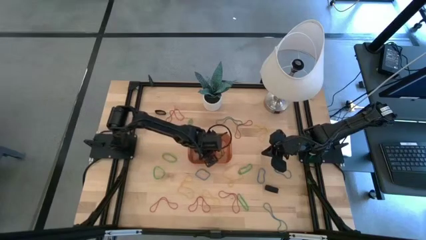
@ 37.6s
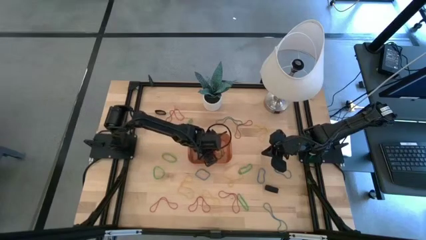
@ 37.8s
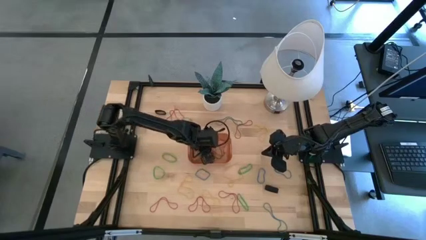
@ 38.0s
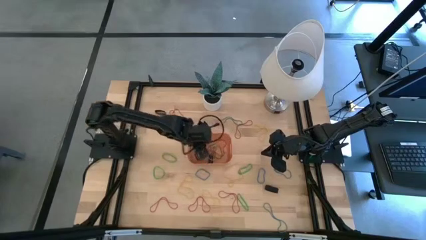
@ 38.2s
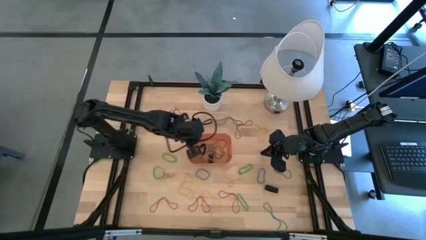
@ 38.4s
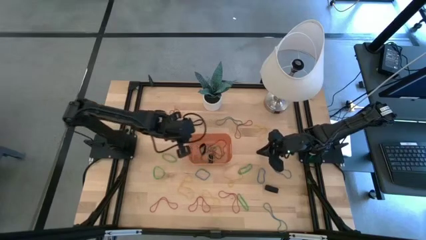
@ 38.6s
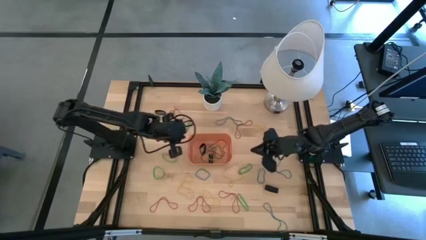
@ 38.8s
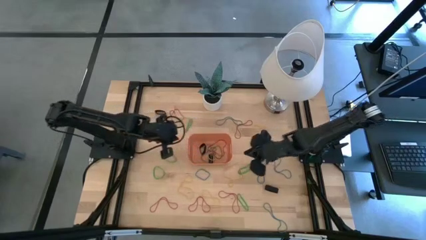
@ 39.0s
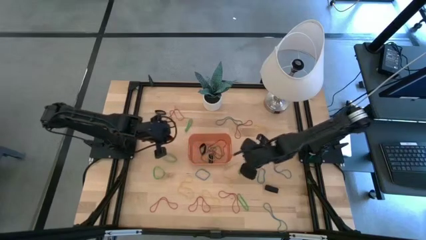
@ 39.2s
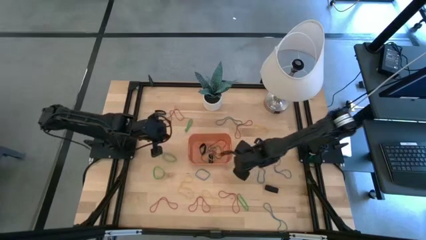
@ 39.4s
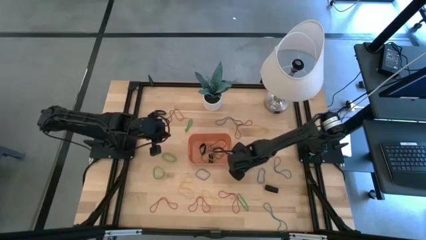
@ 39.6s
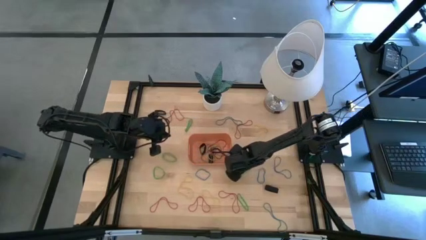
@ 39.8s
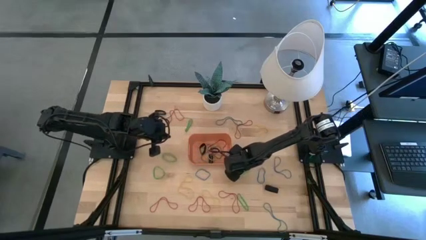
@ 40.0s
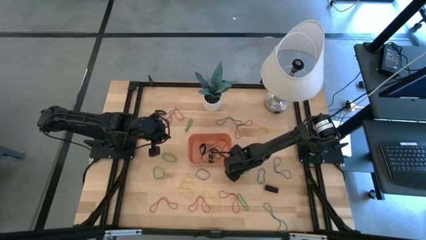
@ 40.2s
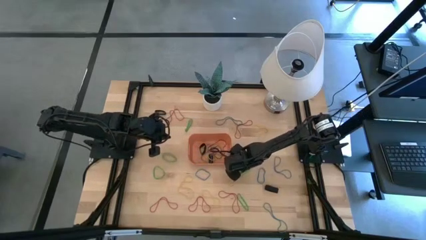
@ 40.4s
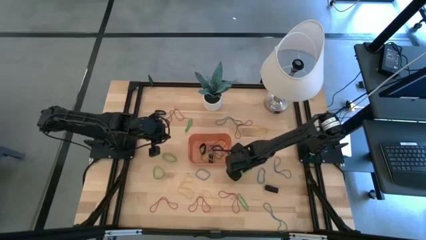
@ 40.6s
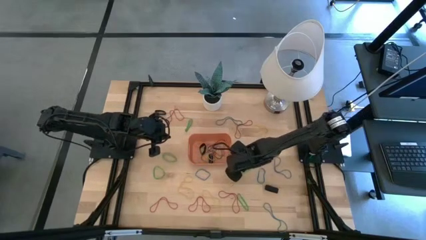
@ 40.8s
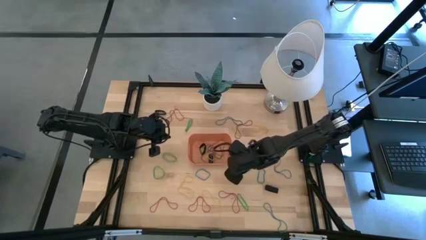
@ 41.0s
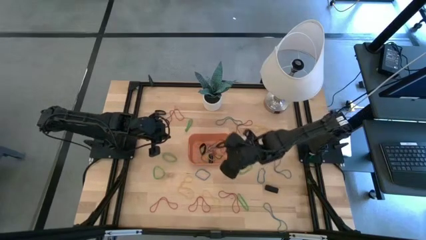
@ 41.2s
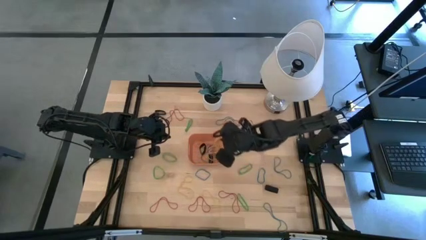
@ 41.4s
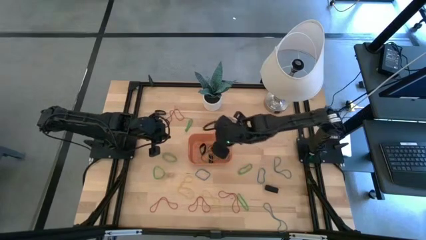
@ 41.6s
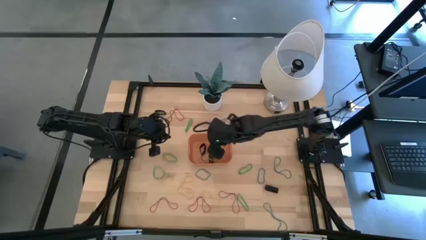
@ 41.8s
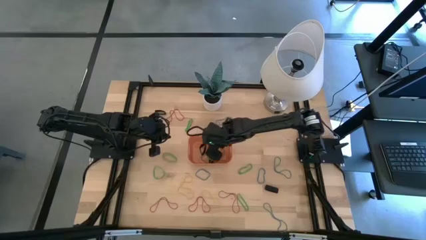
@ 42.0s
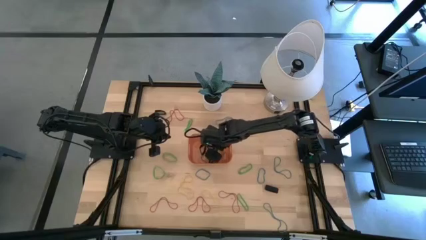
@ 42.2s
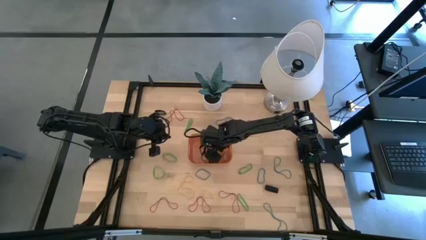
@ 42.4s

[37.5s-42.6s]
Task: Pick and place rubber bands into bin
Put the yellow rubber band into the orange bin

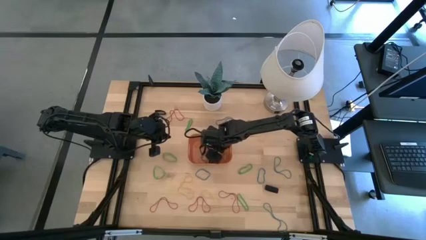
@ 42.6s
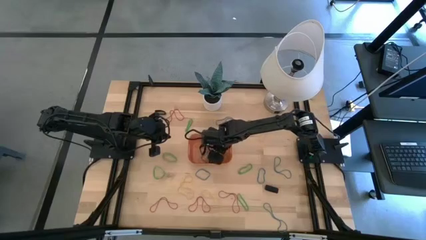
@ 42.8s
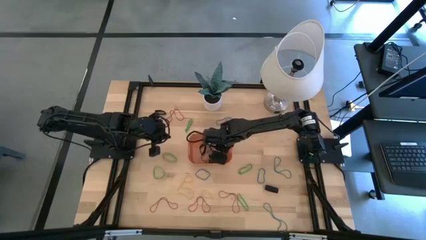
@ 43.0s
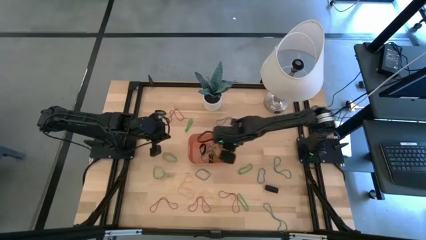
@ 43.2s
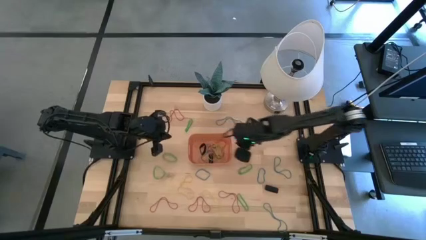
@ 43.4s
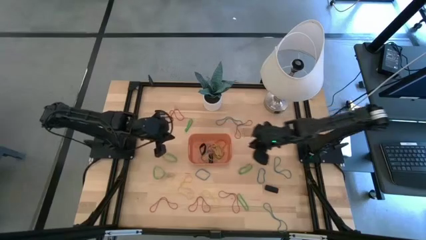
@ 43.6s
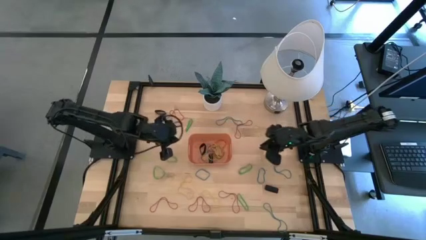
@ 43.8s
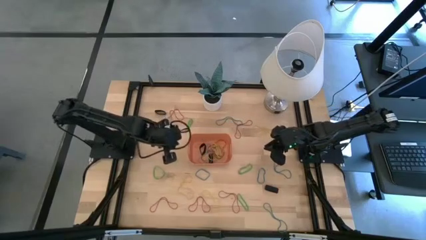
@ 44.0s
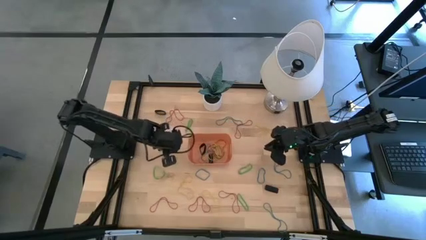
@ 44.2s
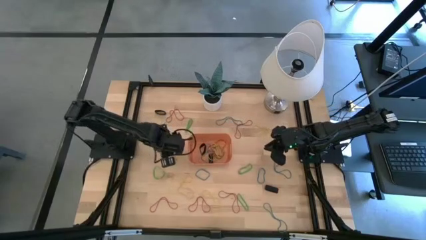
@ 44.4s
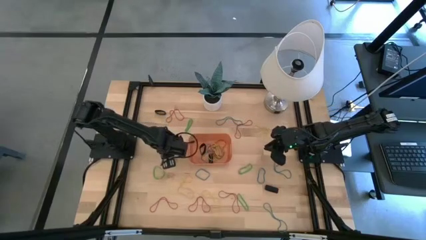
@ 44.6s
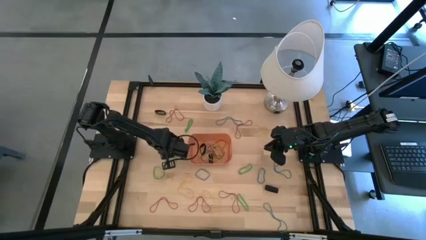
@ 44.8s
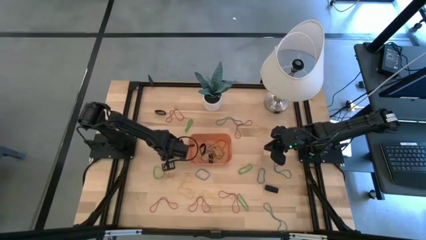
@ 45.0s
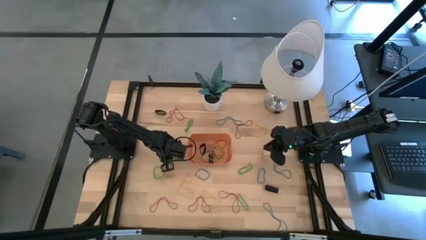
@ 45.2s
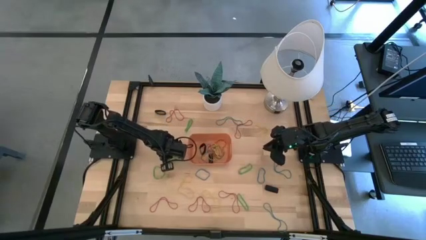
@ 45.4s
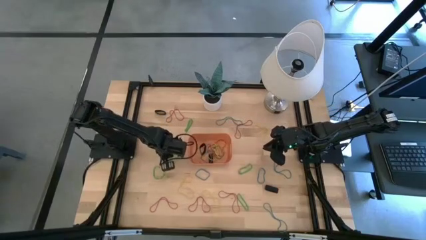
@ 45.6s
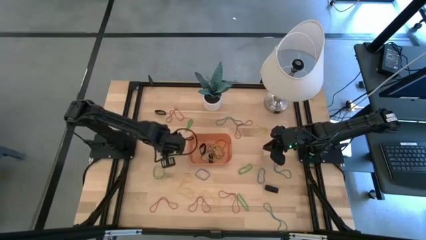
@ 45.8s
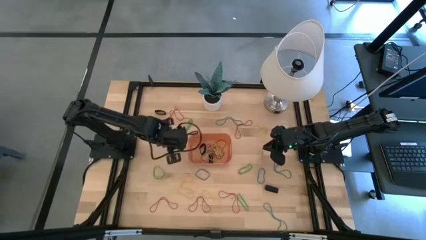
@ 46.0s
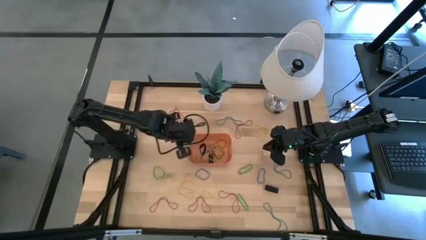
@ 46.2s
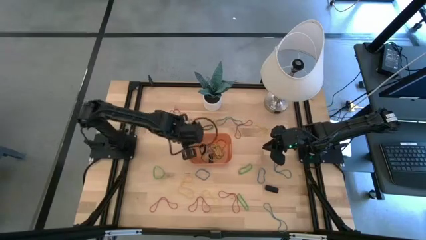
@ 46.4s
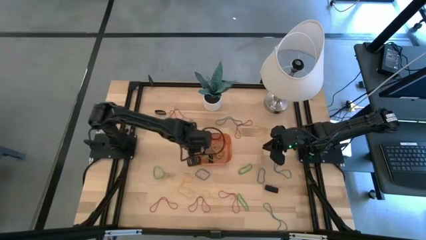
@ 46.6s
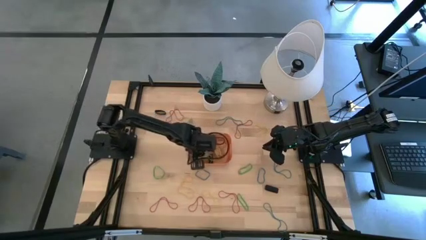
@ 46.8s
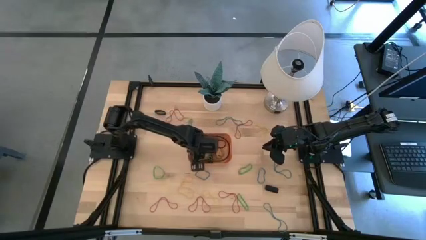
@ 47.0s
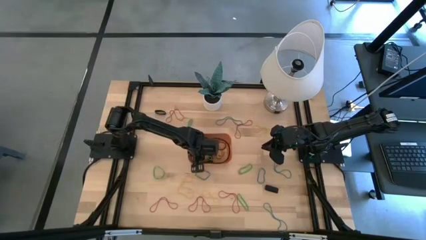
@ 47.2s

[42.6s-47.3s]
Put the green rubber band into the orange bin

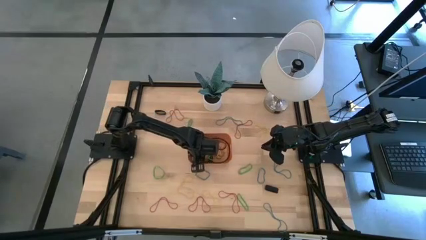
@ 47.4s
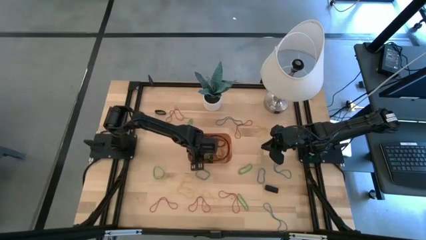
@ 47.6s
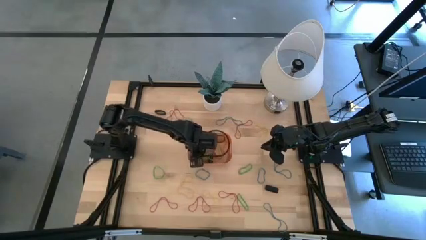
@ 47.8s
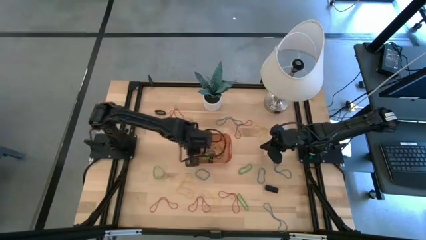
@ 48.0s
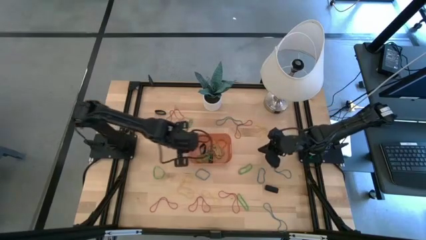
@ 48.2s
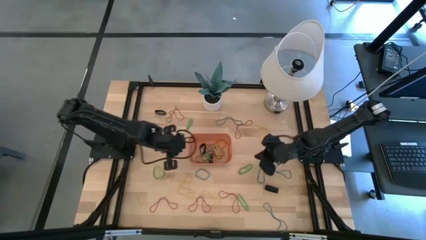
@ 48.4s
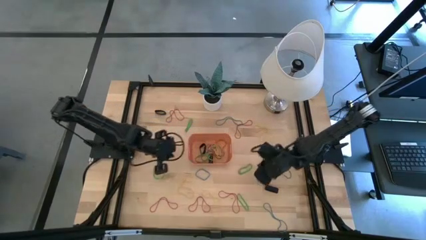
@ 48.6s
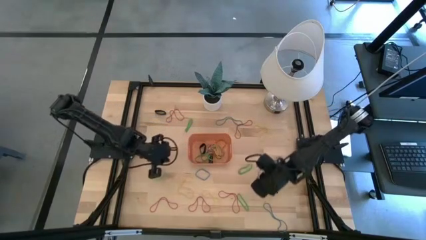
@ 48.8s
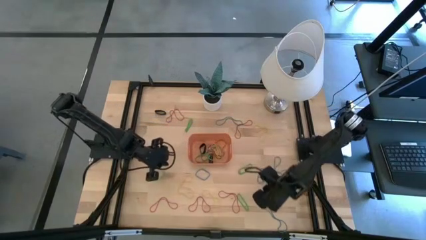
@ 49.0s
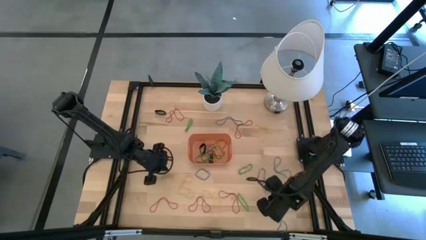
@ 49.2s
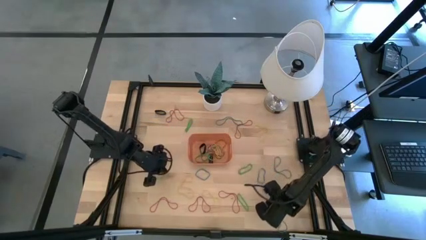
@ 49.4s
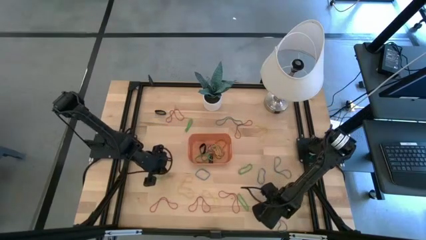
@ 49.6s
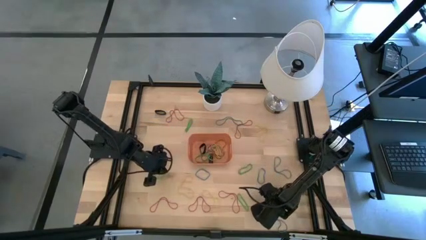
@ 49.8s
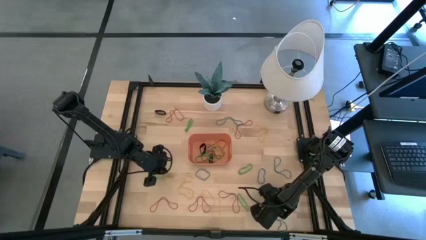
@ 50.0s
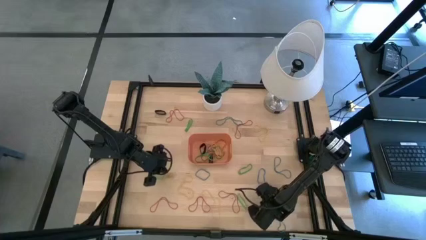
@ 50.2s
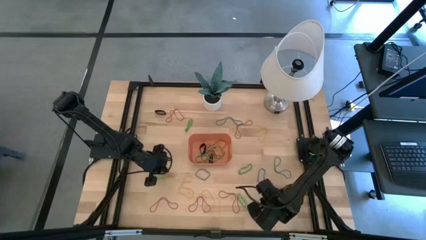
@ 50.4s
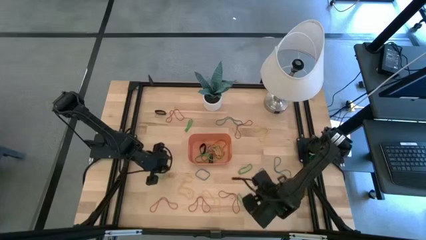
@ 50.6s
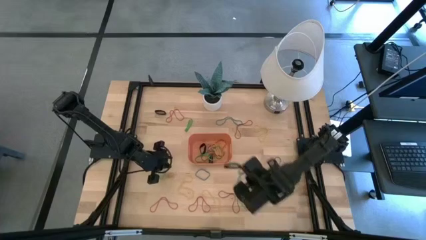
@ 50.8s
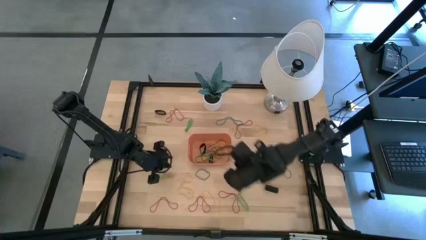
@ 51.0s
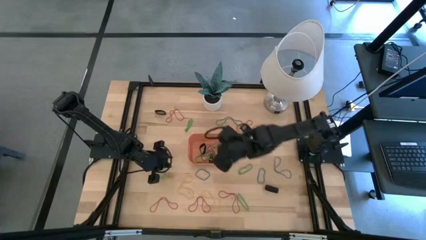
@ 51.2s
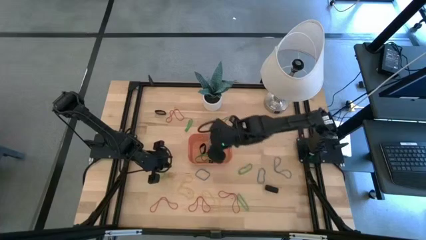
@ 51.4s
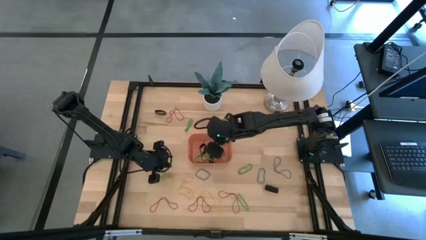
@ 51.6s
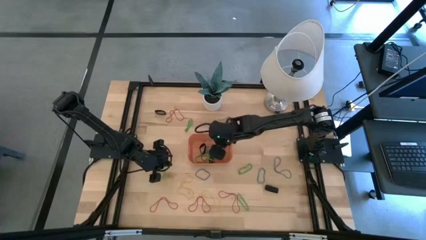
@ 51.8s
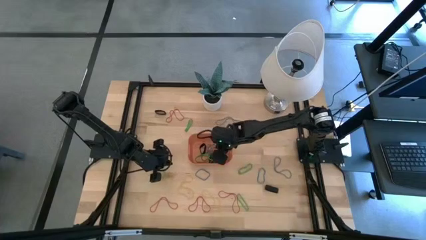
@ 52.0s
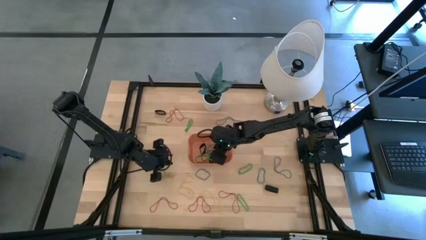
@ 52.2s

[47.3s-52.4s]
Put the blue rubber band into the orange bin

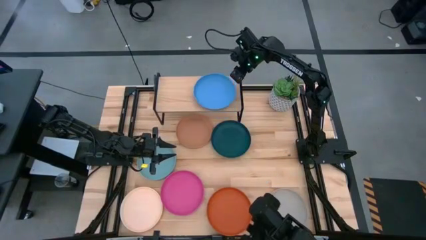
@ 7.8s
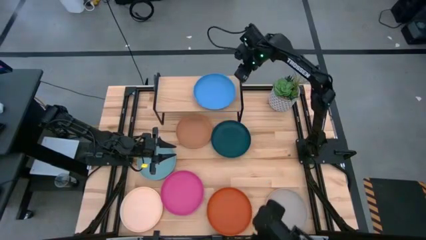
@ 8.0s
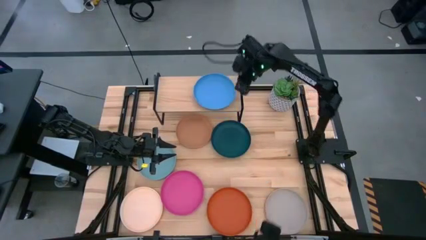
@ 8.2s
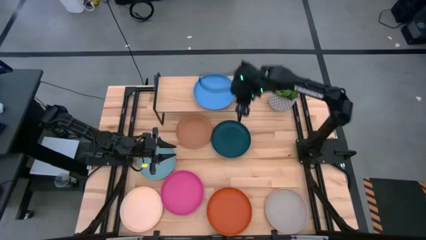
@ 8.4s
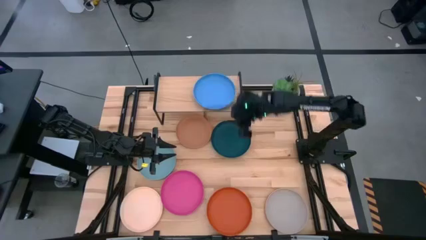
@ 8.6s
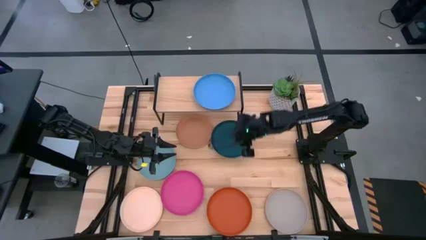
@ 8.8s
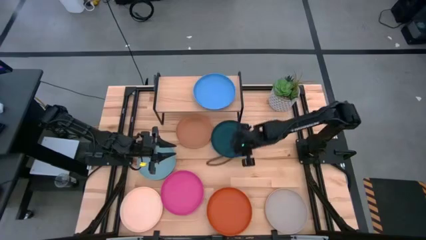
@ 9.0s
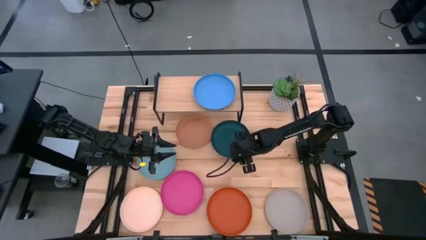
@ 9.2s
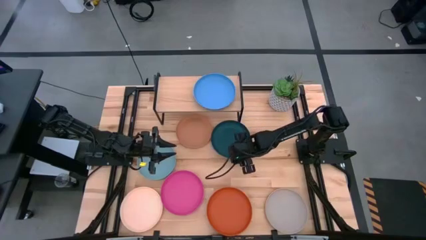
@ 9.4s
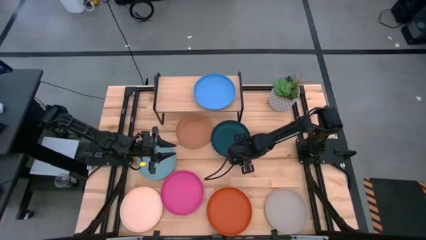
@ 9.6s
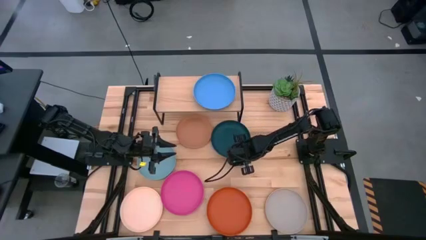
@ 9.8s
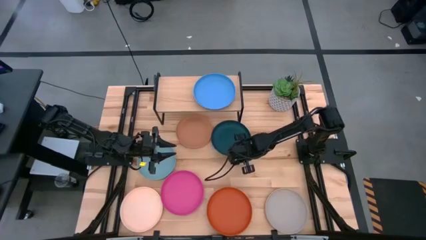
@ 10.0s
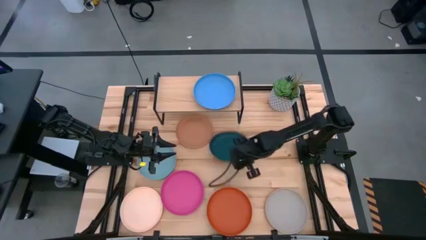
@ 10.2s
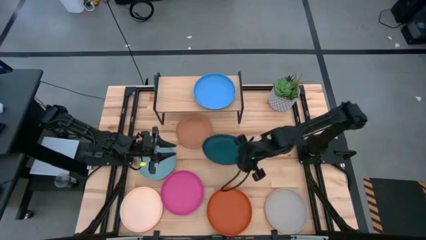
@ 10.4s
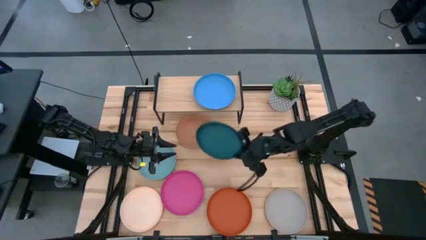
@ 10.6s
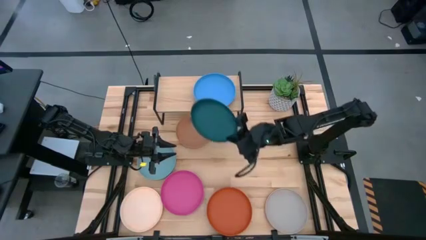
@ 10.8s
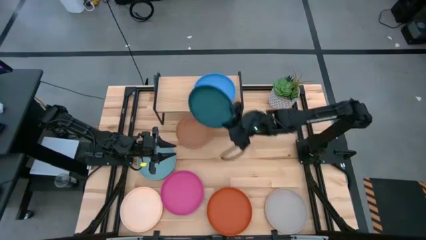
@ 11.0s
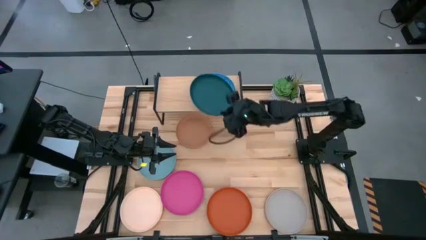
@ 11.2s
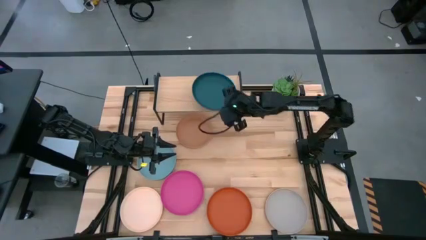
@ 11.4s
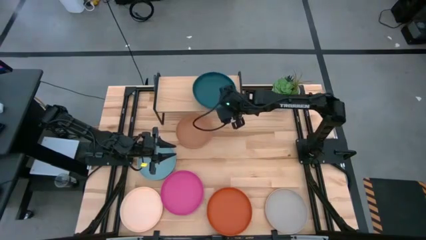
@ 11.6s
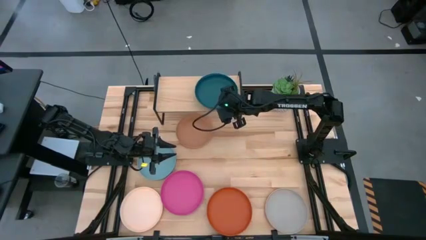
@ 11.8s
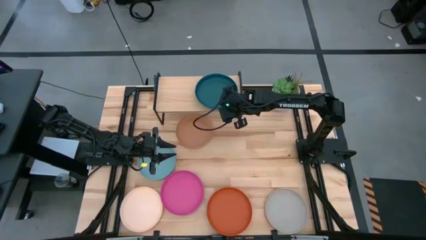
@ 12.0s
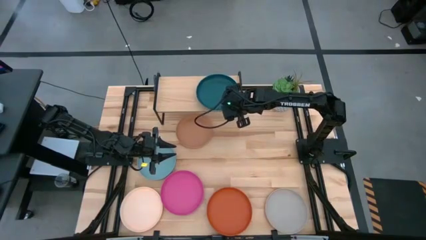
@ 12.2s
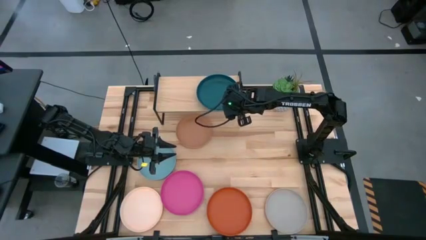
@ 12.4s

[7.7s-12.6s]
Task: Place and stack plates onto a shelf
Stack the green plate on top of the blue plate on the shelf
